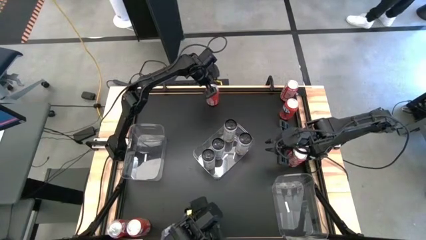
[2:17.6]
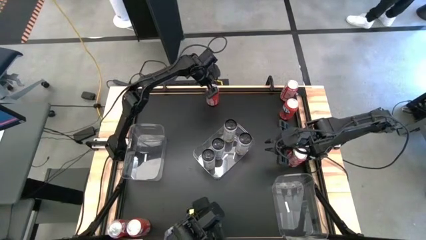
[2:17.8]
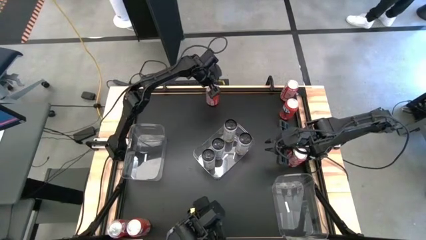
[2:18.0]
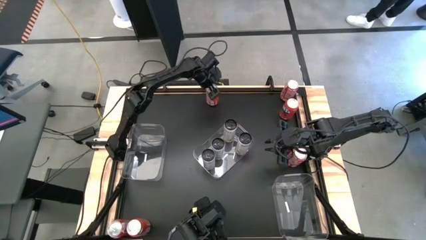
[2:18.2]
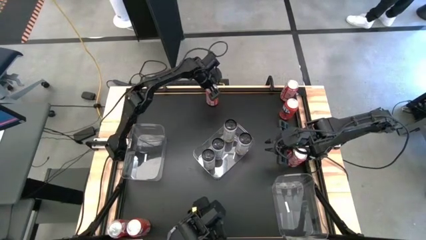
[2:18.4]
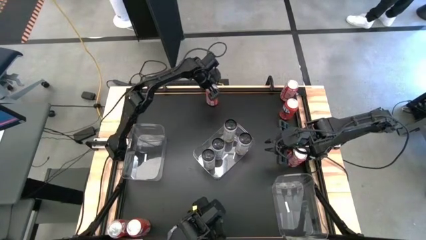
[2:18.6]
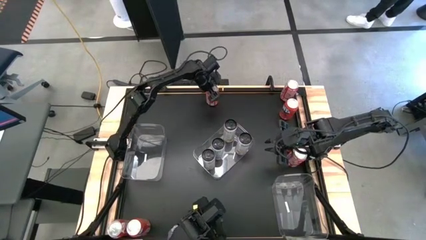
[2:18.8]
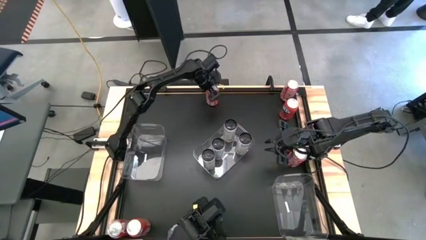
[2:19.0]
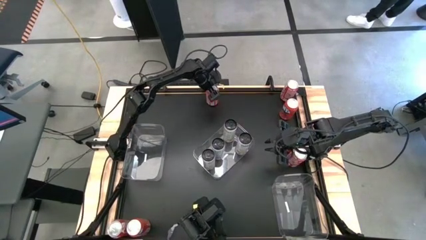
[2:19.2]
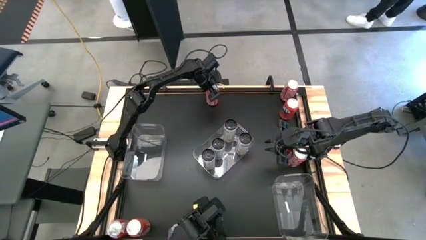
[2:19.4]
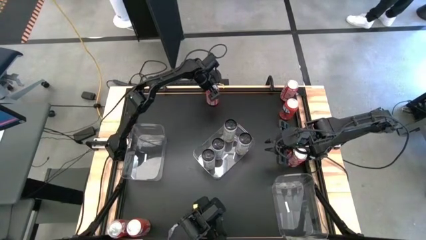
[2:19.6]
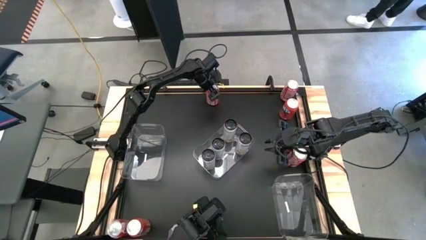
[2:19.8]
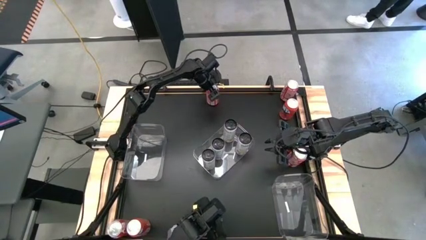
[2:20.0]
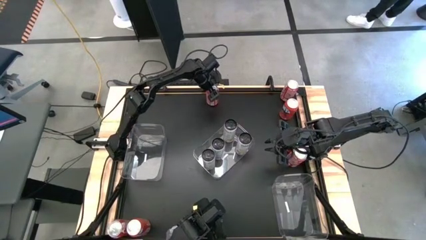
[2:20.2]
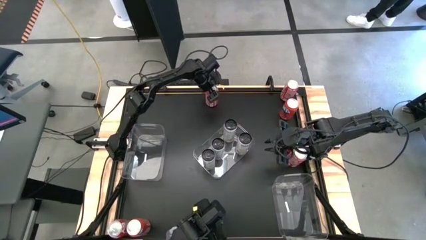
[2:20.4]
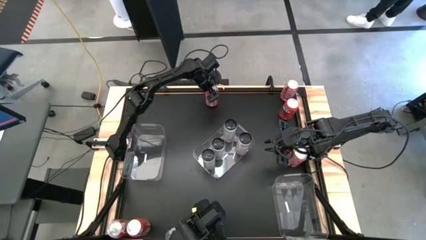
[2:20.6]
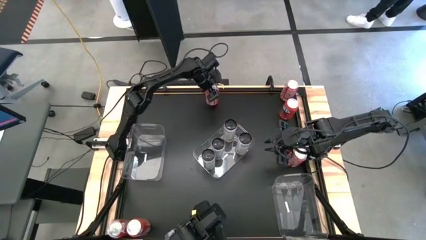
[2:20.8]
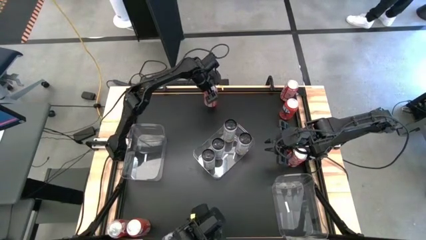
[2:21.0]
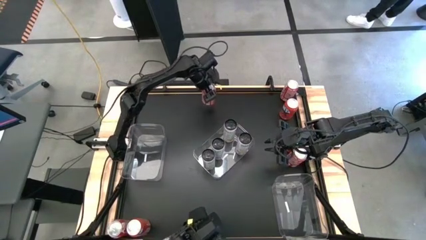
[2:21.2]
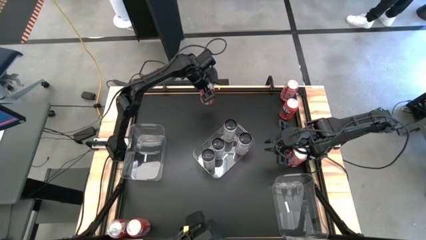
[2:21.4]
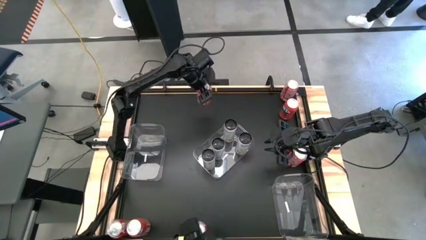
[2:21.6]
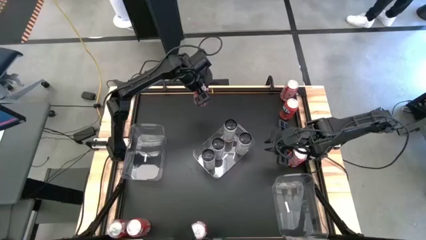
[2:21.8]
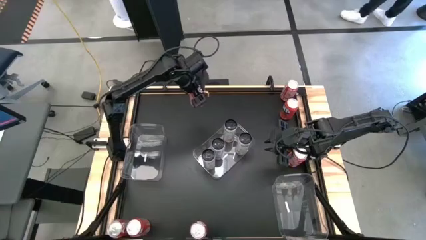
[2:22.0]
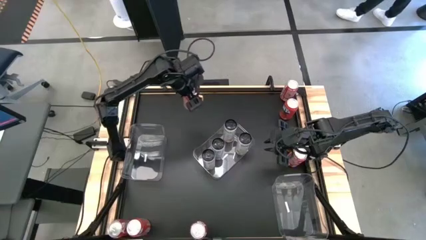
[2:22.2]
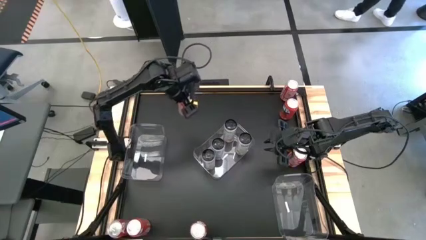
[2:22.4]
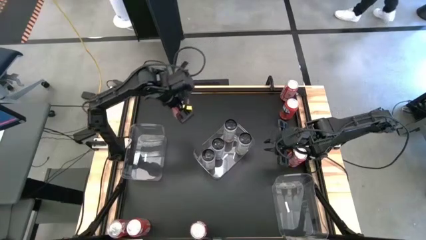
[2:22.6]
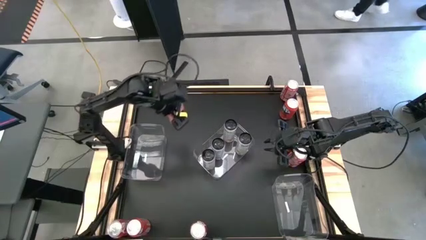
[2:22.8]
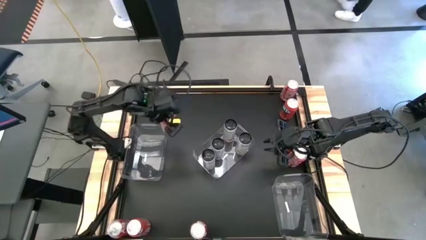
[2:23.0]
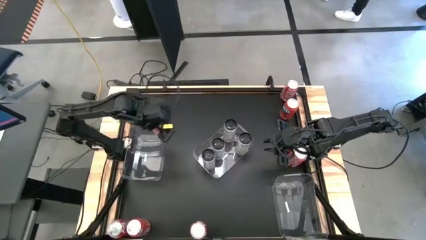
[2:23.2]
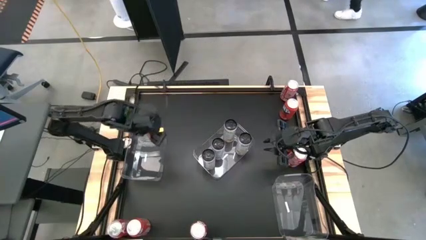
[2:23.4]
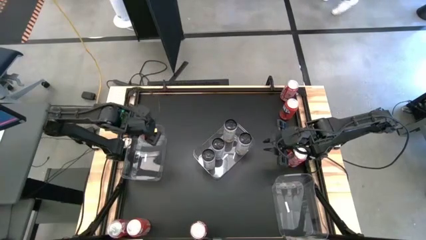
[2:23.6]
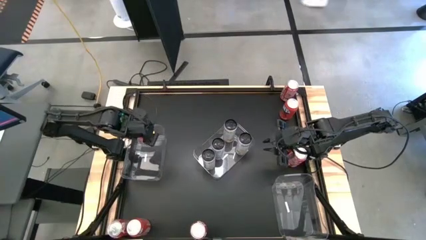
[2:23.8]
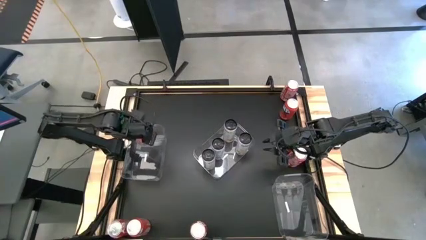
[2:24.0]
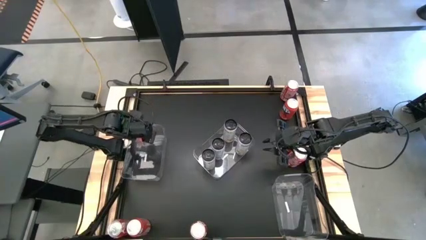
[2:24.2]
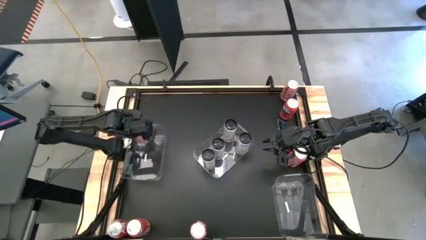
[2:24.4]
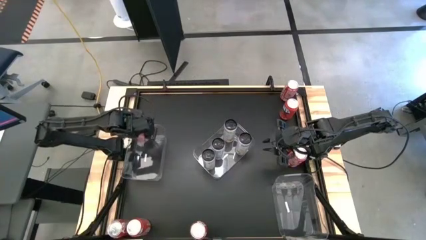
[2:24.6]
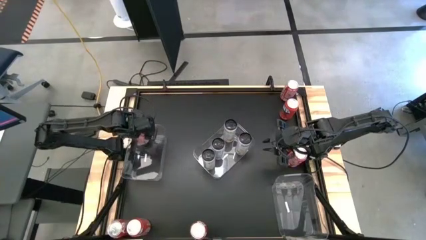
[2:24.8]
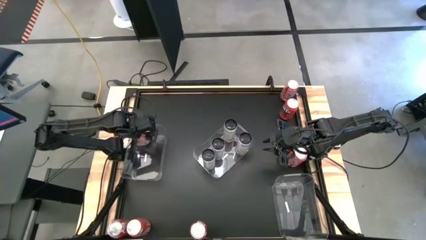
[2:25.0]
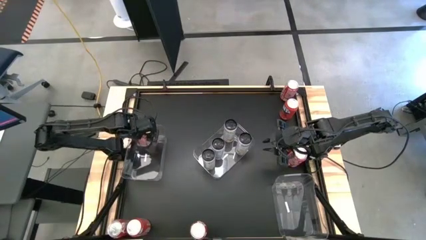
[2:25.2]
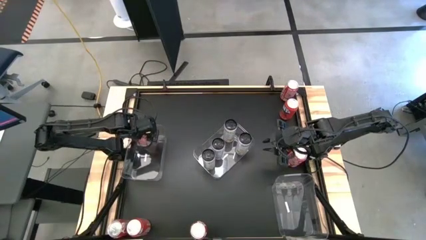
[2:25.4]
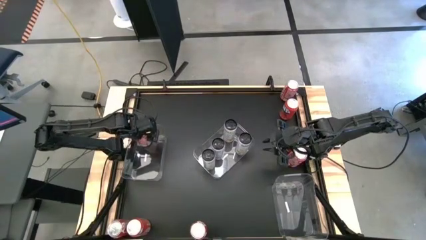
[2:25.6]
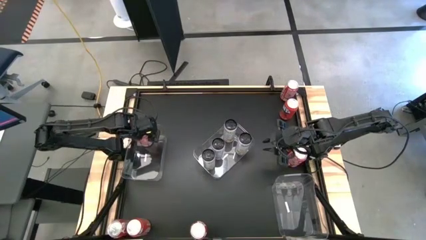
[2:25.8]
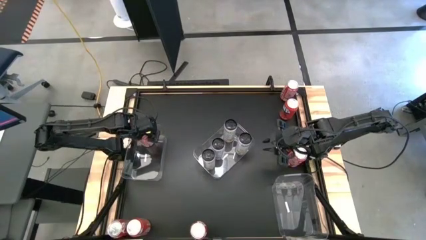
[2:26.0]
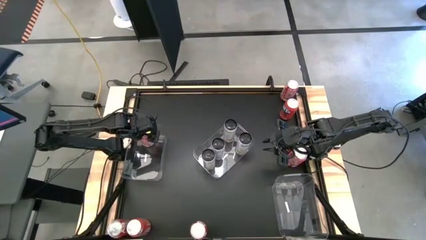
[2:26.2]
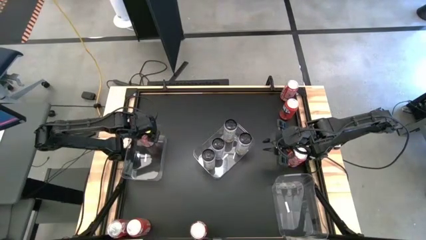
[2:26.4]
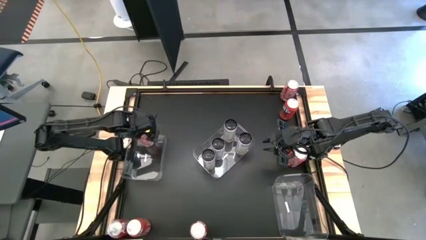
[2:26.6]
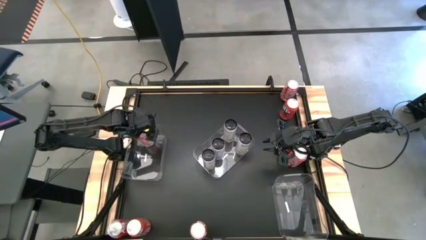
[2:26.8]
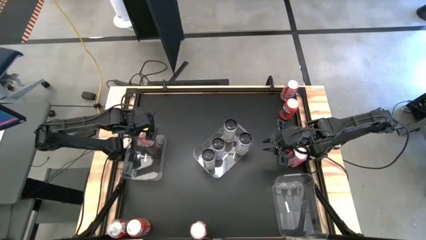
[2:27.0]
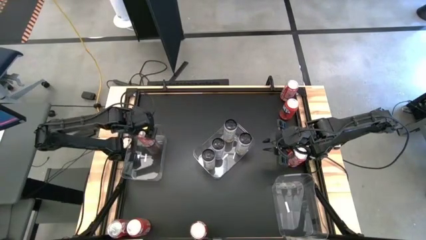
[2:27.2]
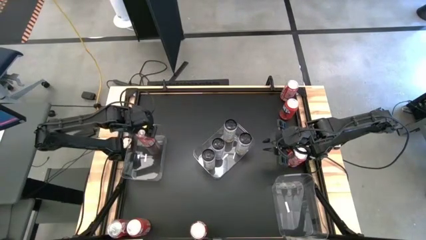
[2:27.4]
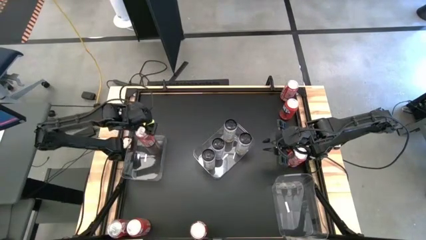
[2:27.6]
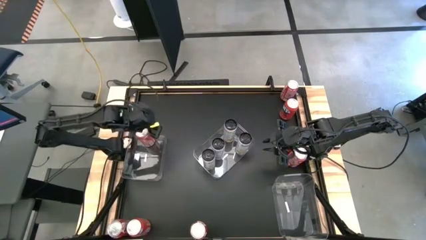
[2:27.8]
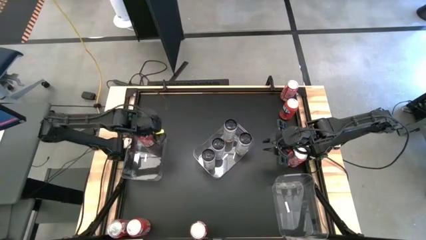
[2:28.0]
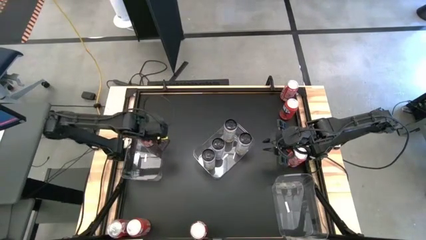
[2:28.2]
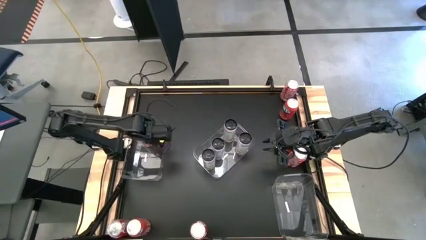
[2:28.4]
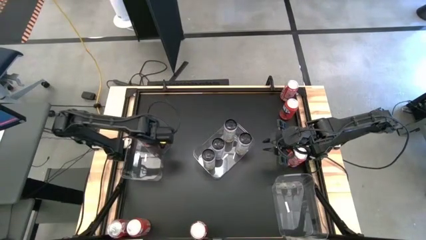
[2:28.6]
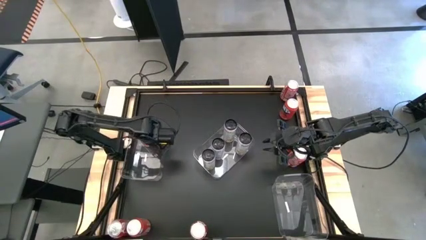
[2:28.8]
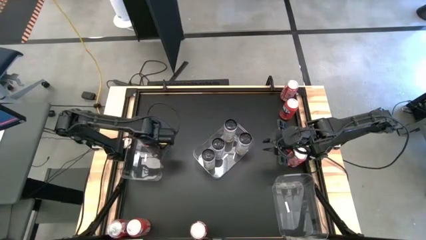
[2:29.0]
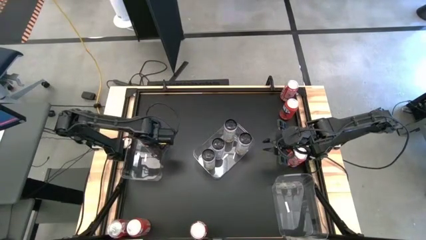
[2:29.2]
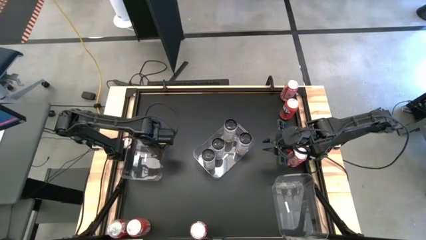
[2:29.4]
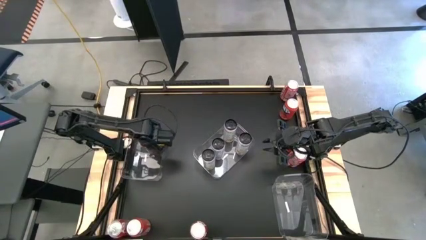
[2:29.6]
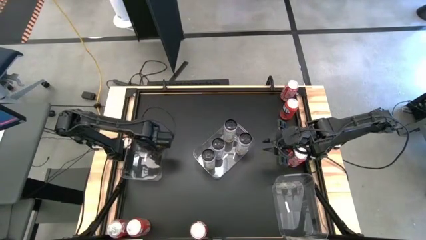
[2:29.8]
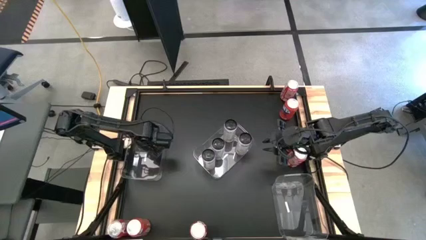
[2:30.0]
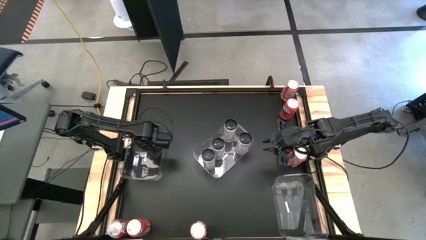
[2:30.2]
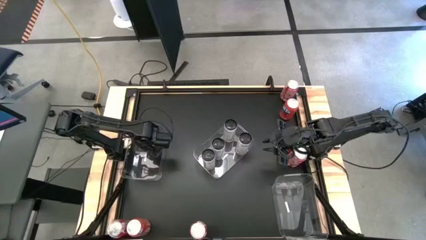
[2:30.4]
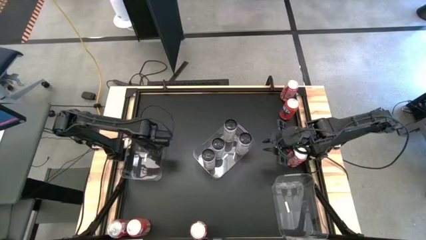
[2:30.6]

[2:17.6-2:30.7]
Task: Sort soda cans
Put the orange soda can into the left transparent bin

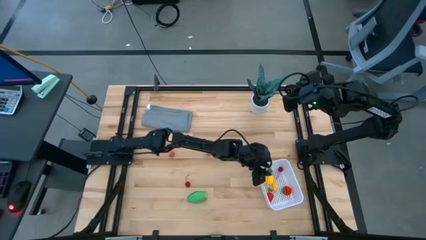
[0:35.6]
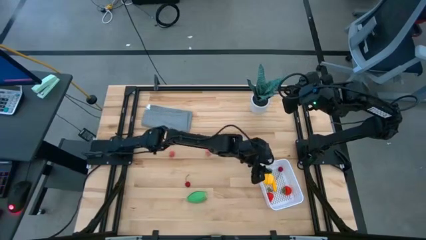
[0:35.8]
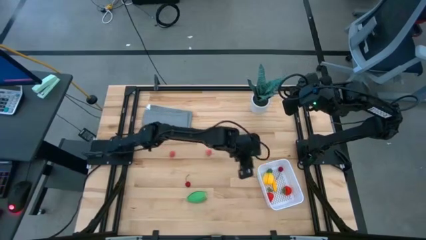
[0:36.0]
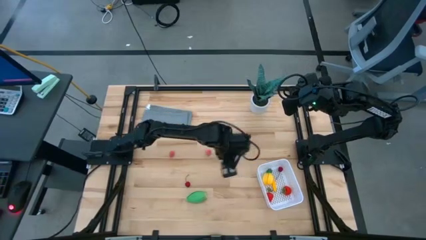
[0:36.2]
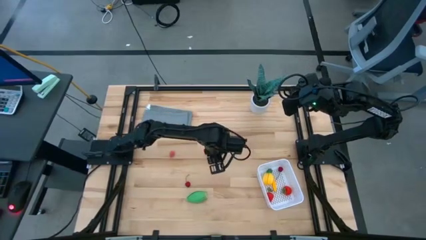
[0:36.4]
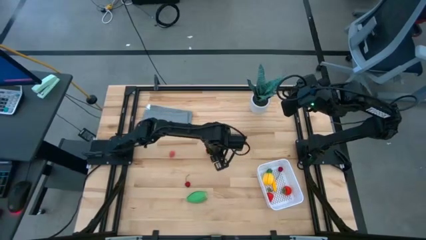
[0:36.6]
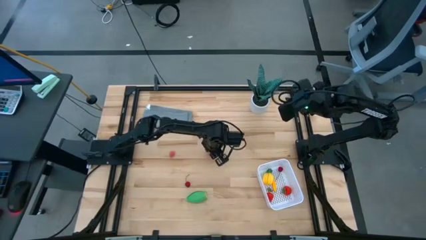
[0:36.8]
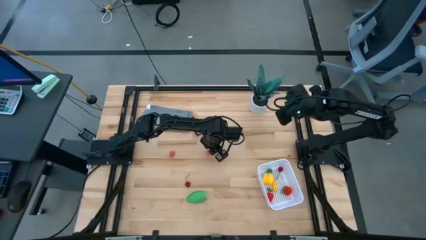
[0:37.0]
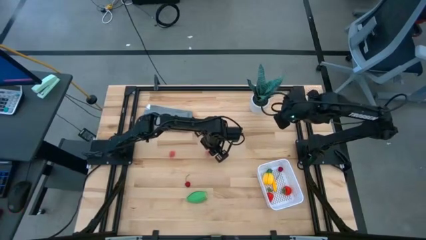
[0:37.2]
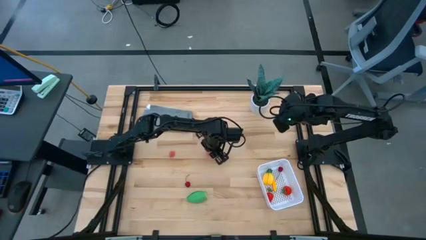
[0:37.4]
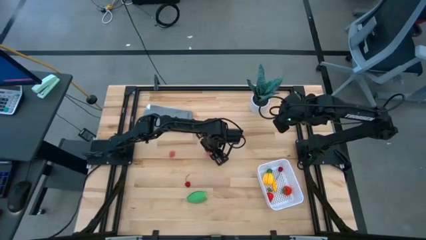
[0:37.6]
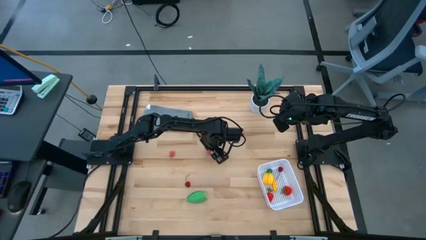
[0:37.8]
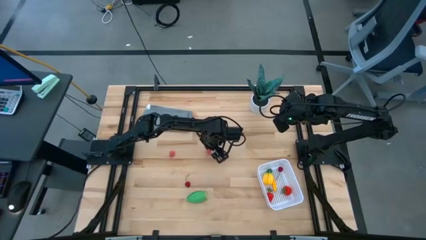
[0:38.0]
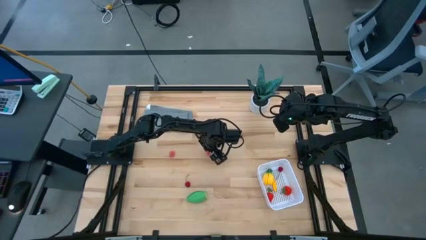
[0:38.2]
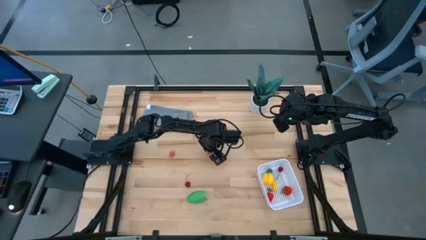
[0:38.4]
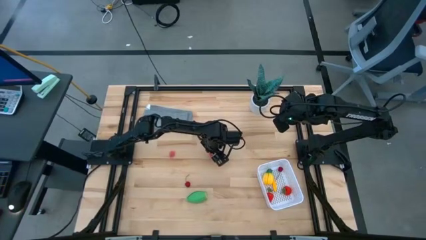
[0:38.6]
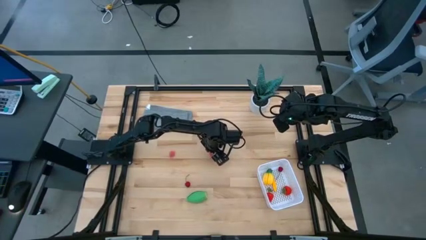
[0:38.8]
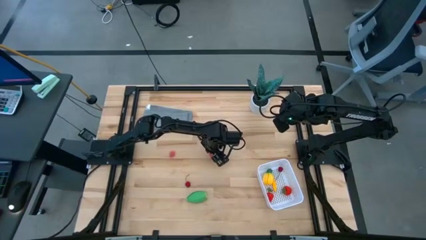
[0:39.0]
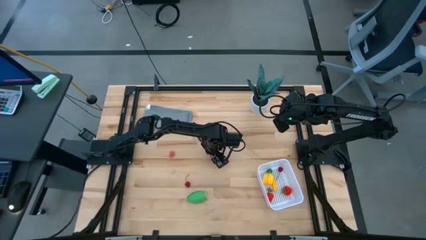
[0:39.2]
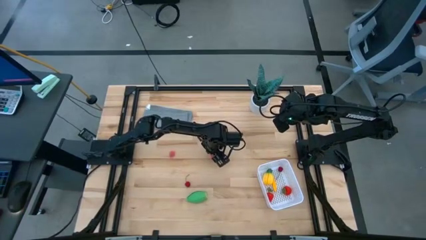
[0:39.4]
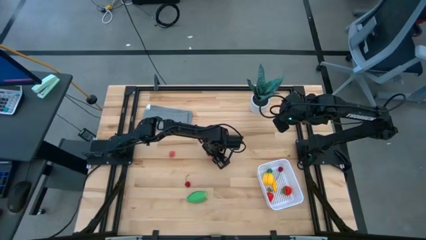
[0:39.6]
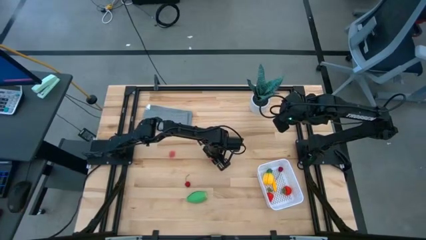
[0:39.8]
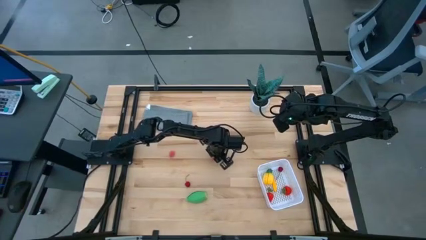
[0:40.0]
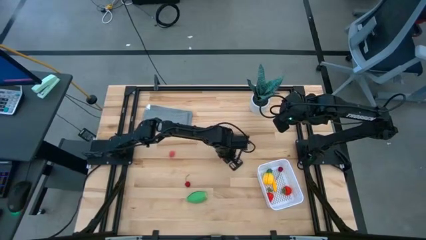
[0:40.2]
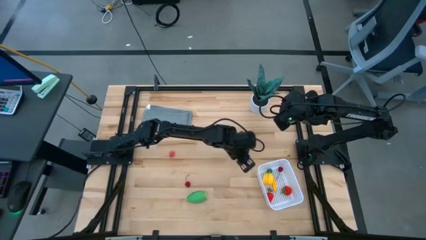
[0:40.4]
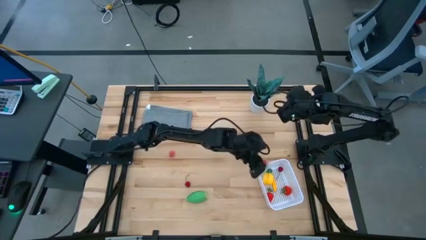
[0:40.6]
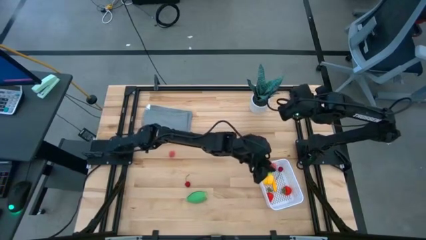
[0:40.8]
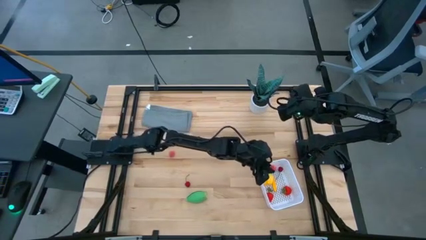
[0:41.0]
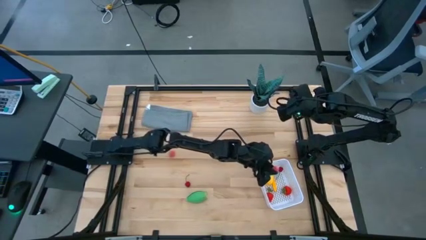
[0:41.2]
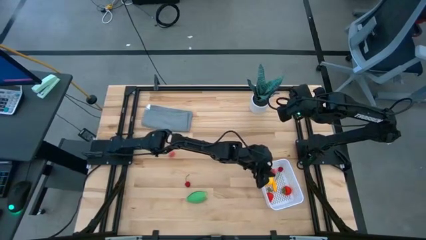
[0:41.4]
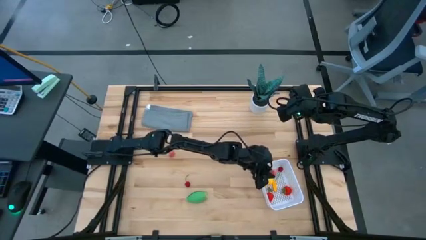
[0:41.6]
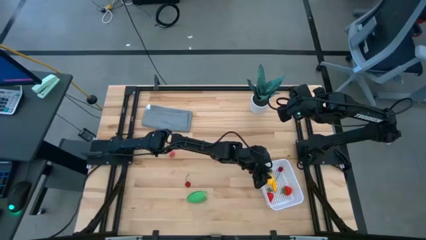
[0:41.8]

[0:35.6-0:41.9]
Task: Pick and placing Produce into tupperware
Put the right peach into the white bin
